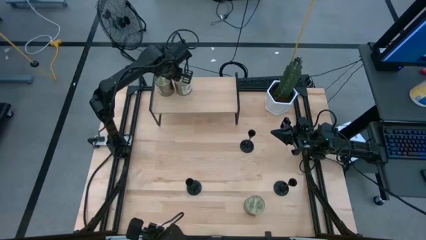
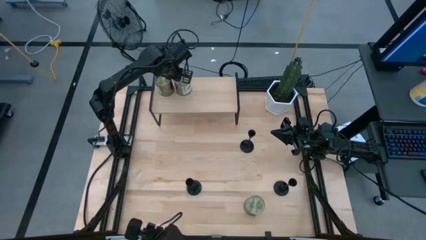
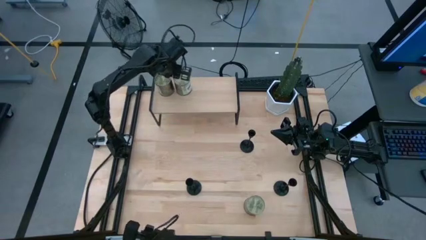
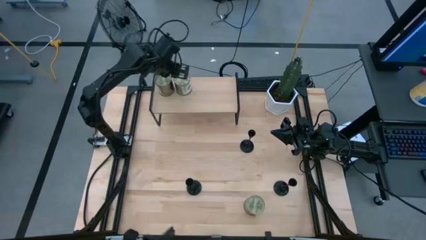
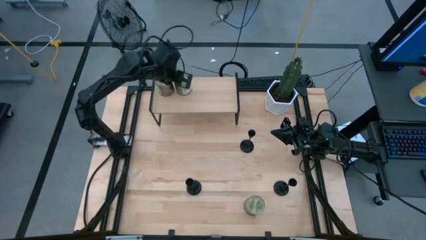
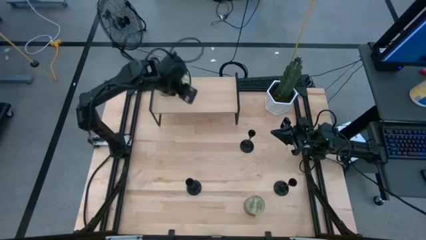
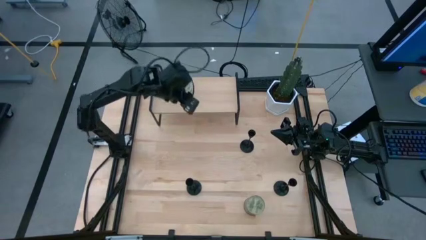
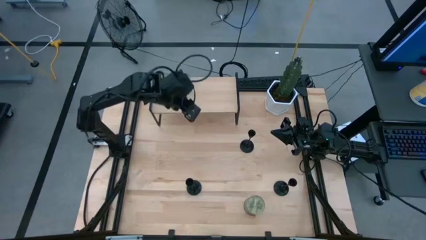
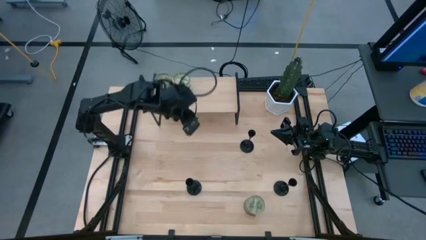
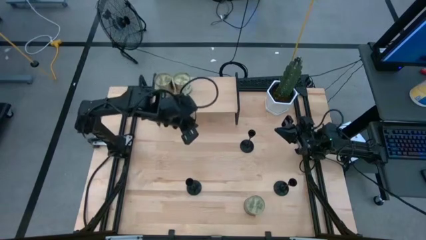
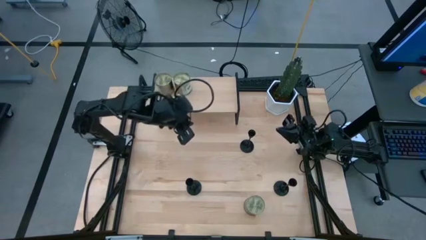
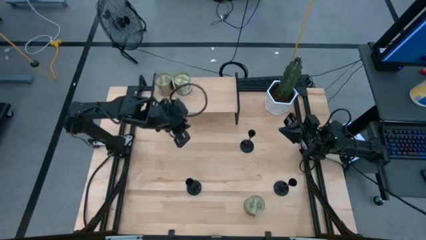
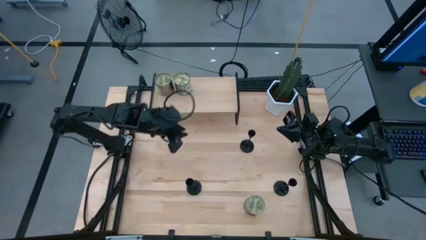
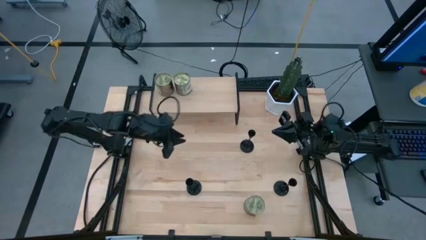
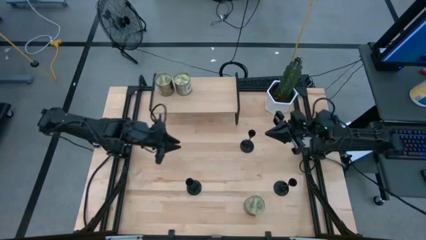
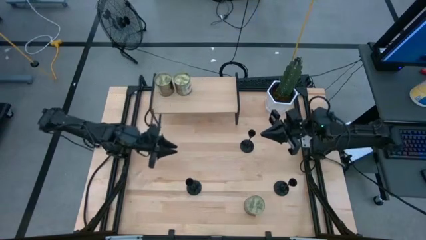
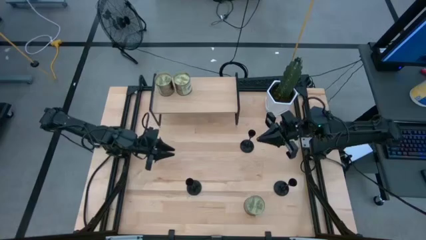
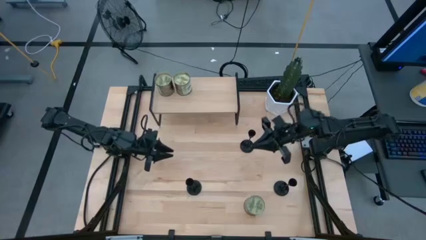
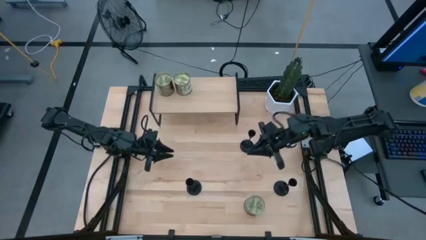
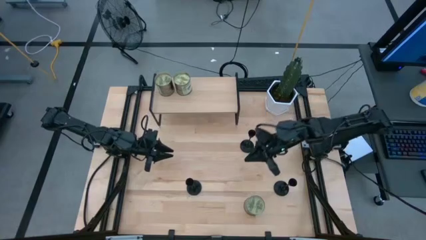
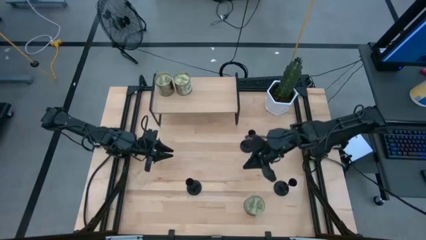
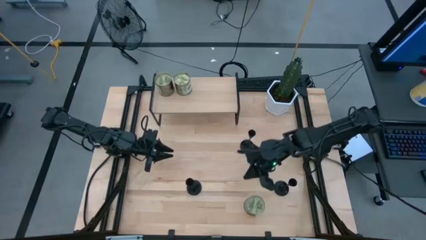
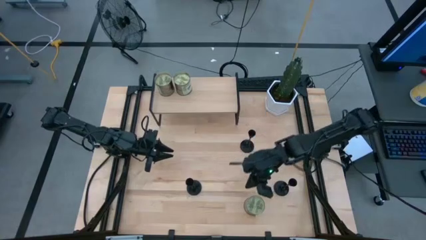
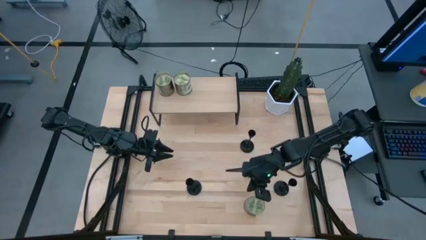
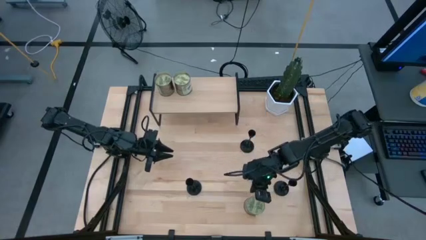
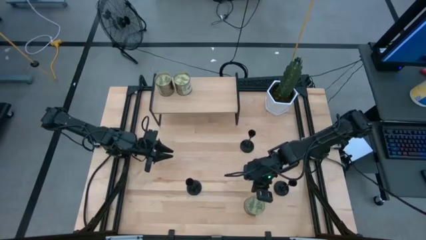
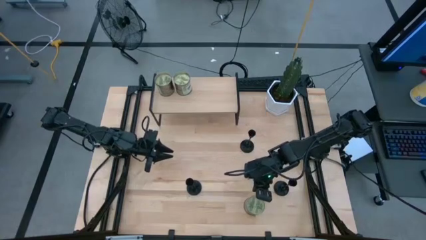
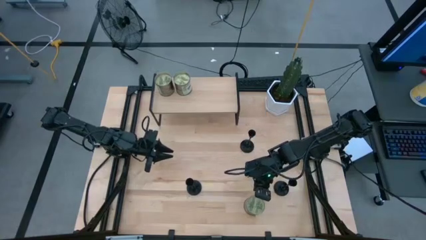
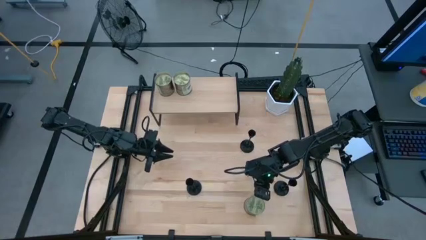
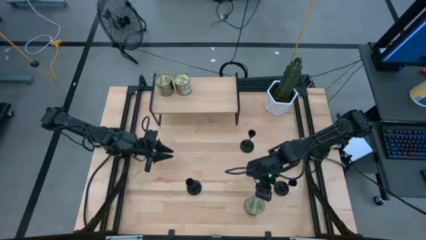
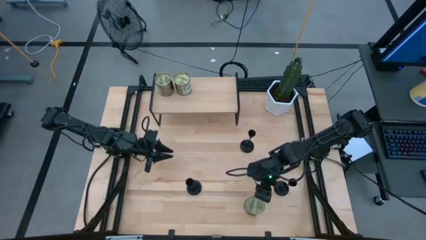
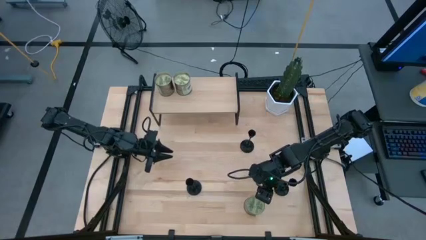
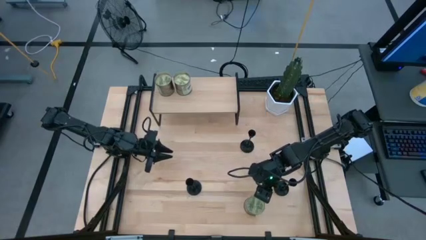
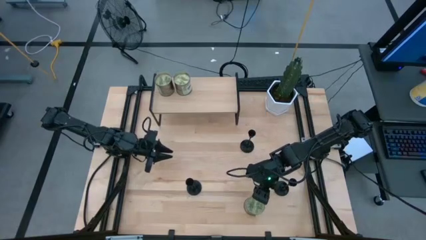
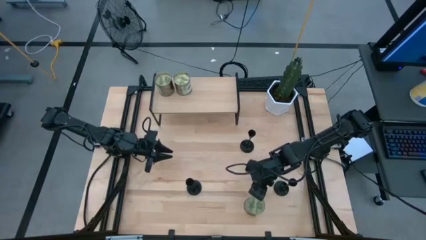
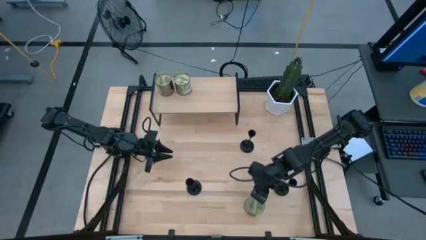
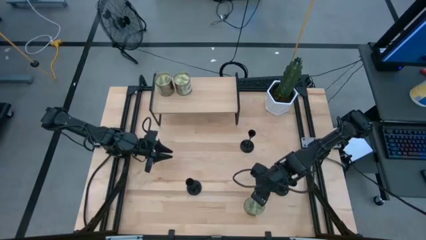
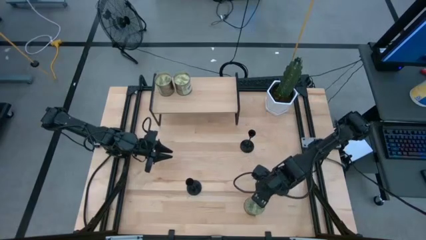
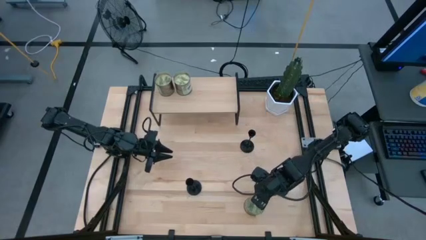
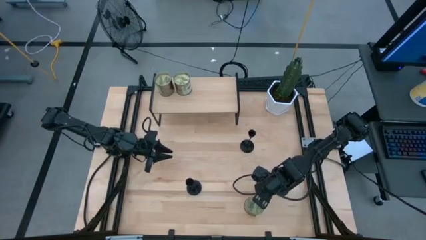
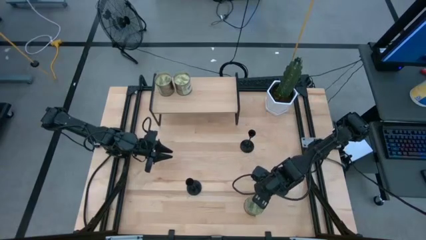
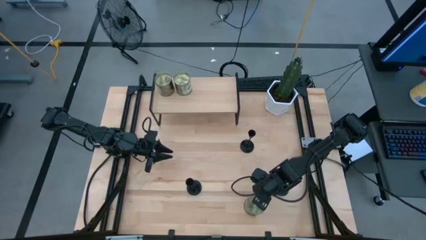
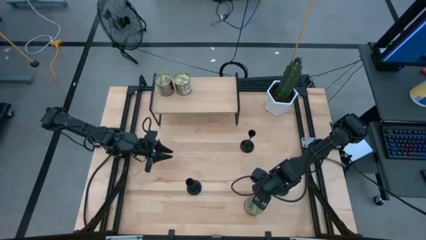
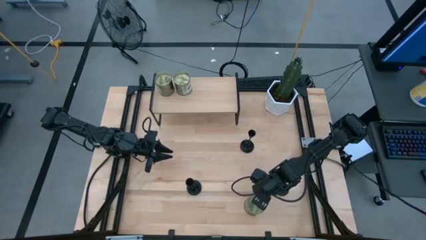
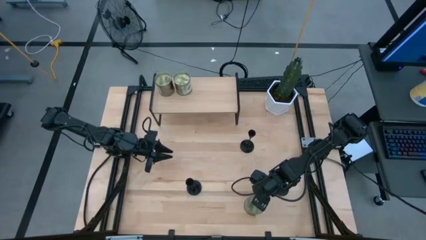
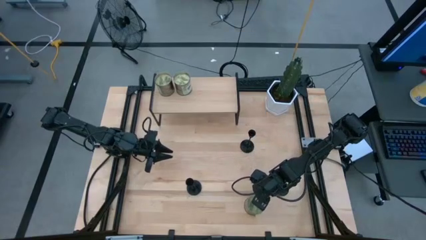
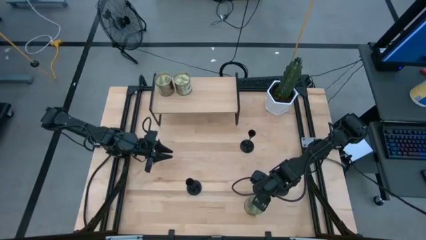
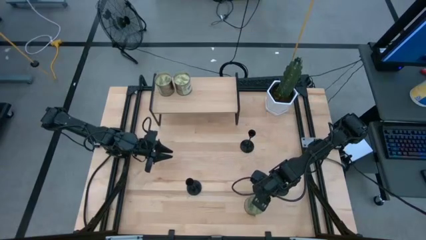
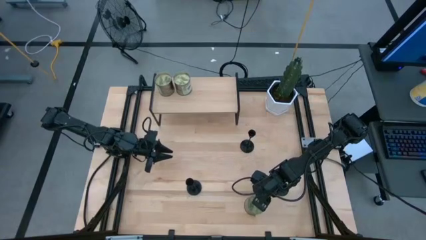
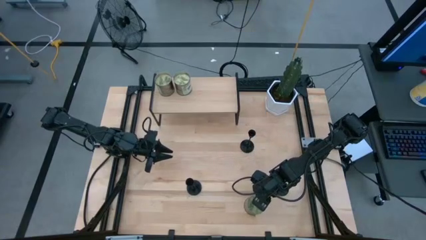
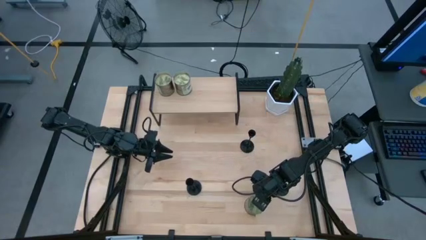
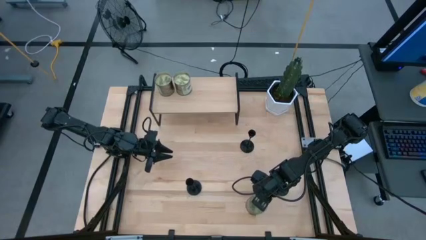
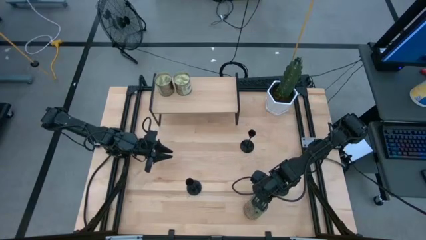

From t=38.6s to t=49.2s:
Task: Pick & Place candle stick holders
Put the green scented candle on the shelf

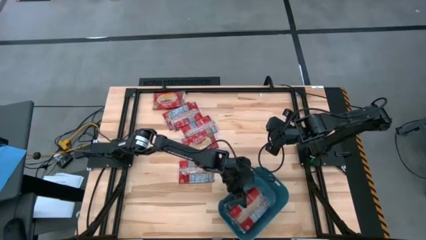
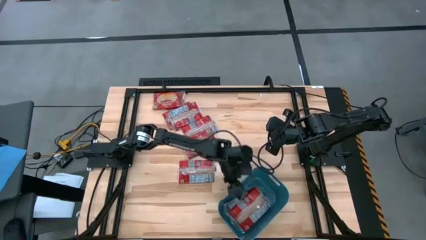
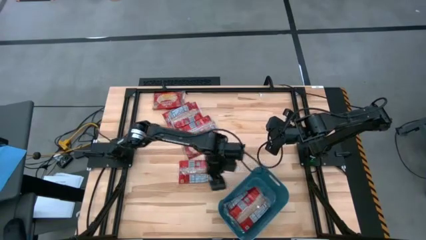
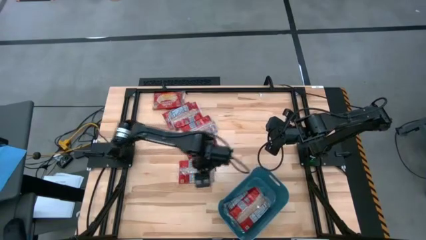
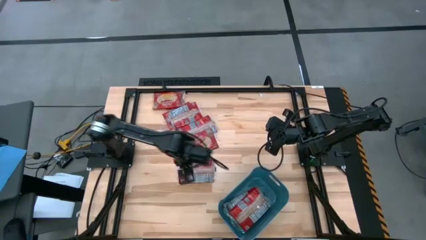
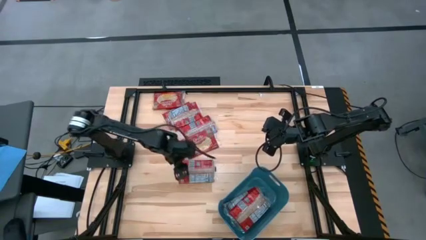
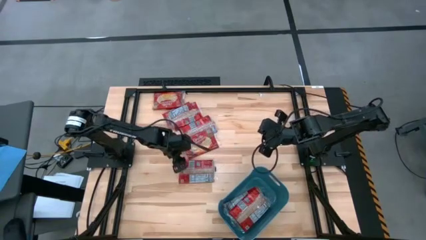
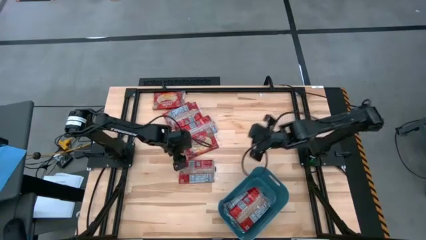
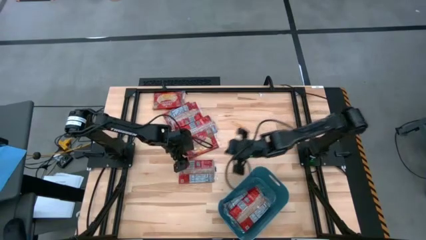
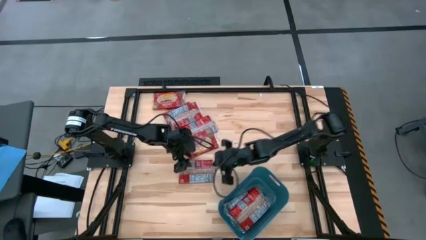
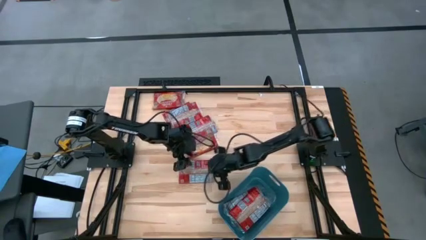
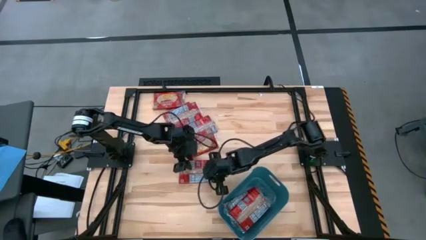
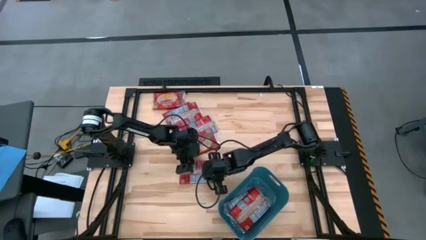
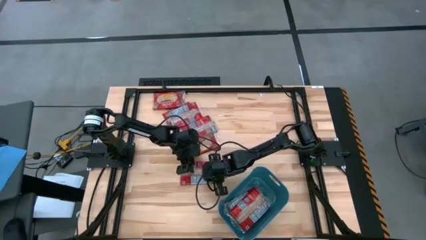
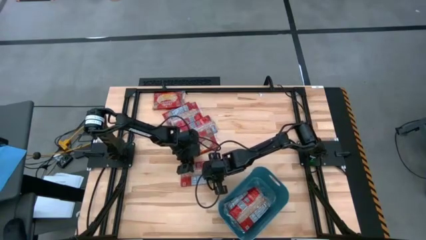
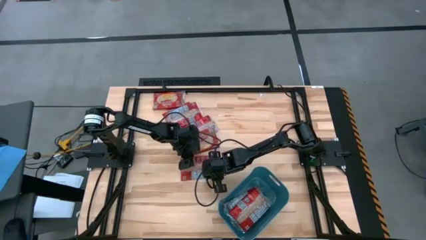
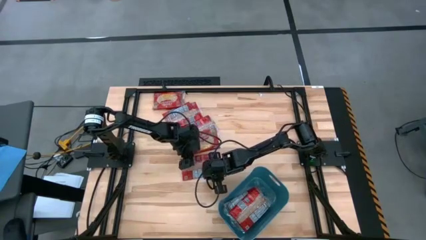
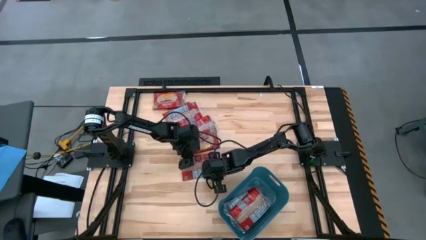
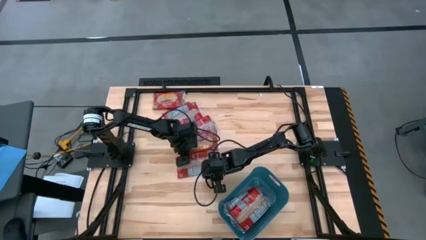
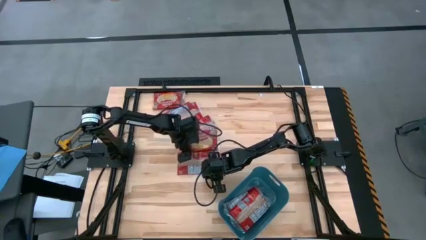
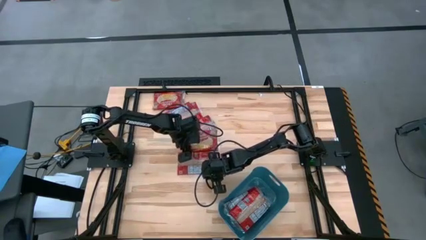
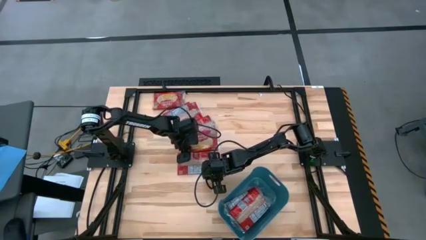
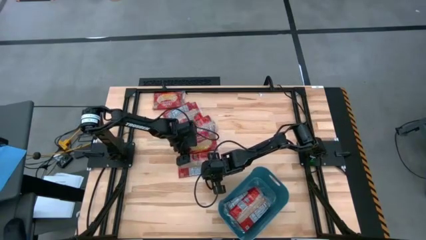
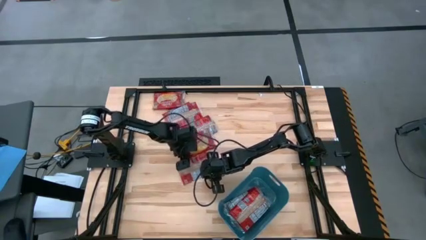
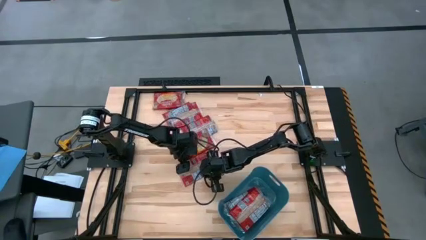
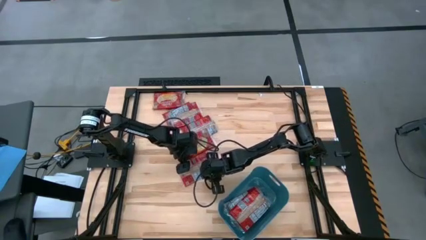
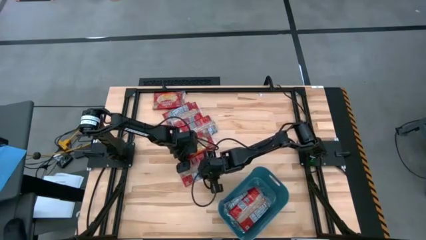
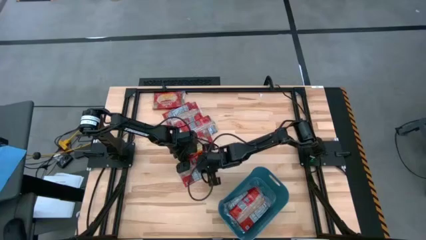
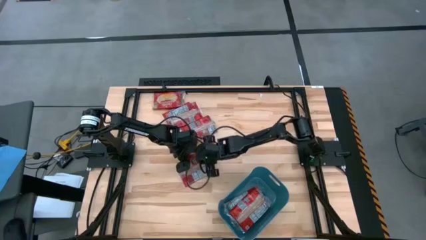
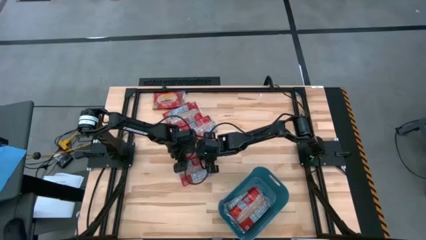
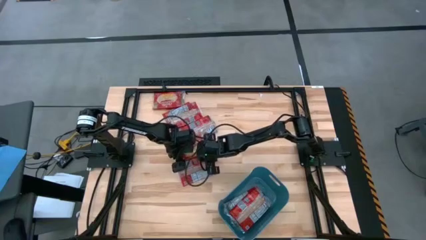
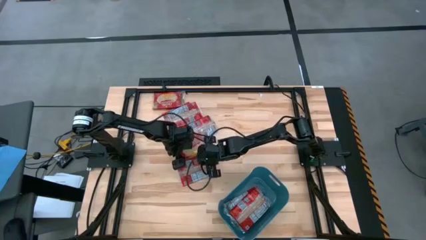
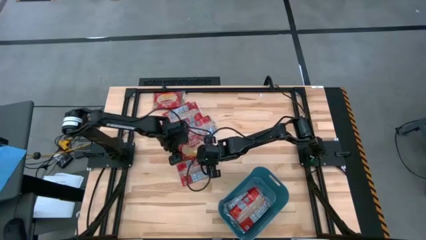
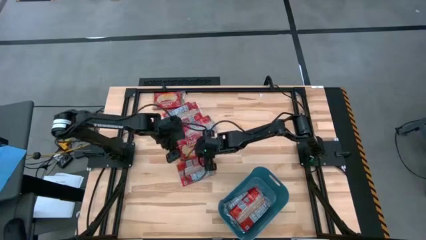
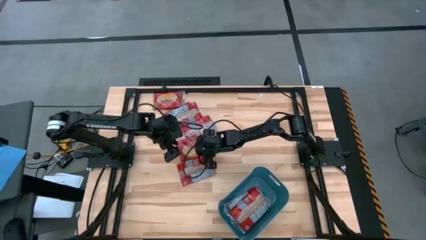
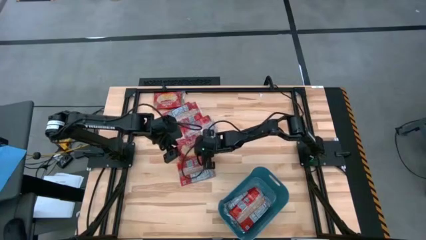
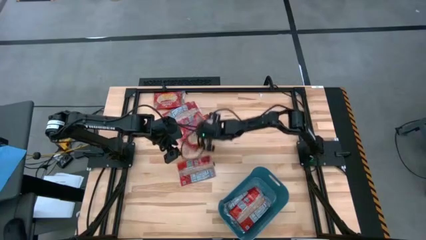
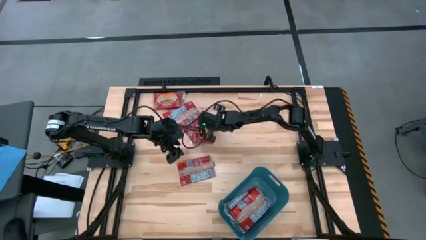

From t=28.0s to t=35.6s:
Task: Sort popcorn bags into baskets
Adjust the popcorn bag
